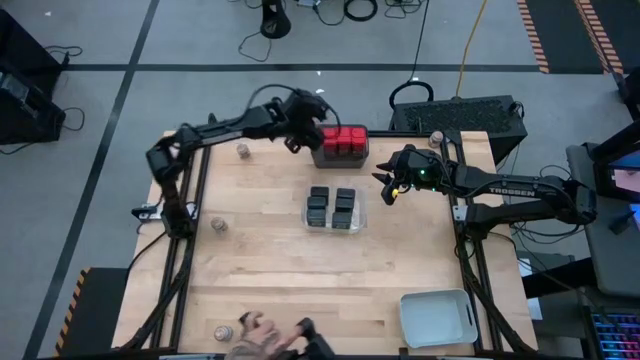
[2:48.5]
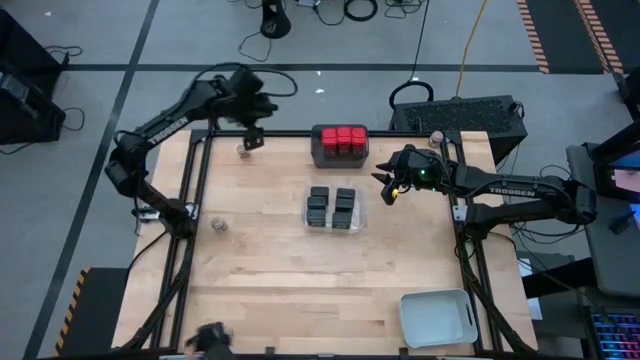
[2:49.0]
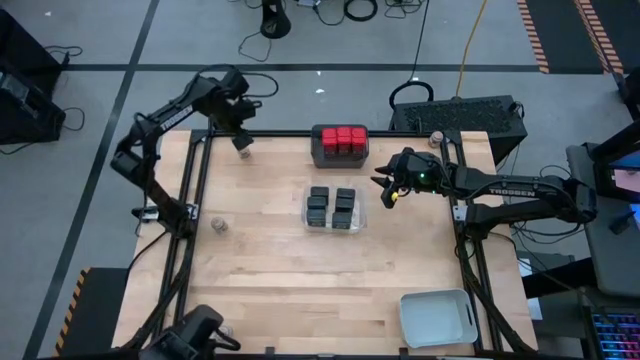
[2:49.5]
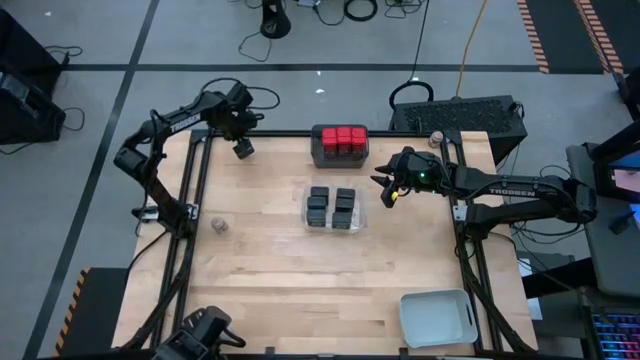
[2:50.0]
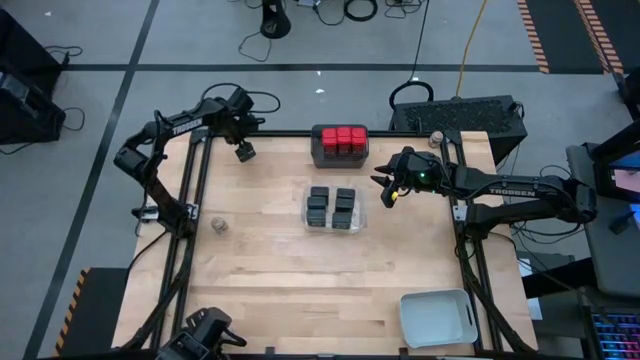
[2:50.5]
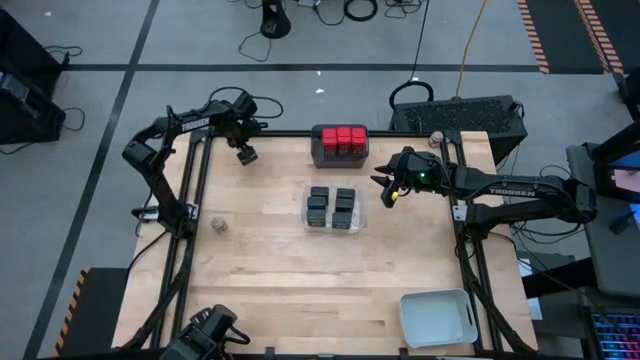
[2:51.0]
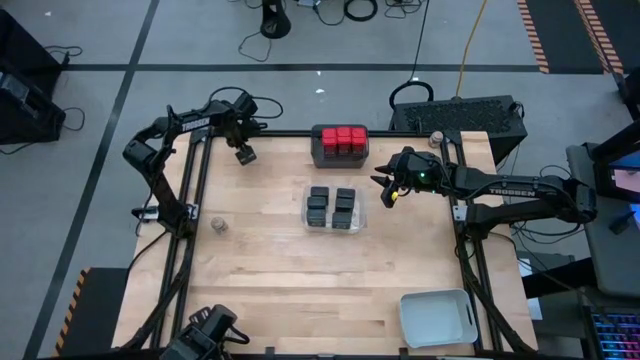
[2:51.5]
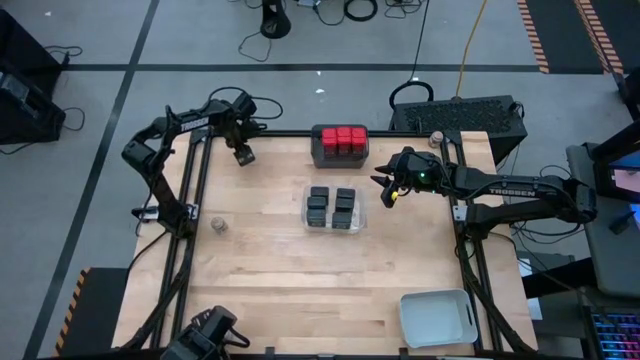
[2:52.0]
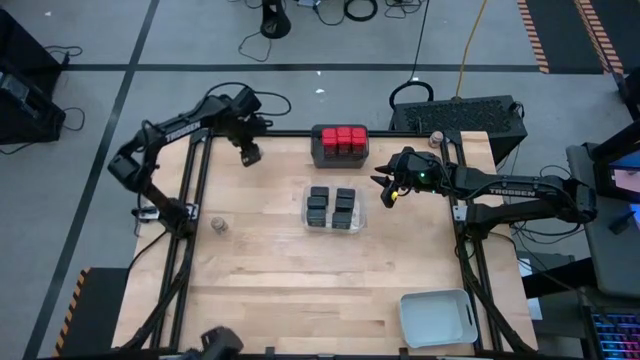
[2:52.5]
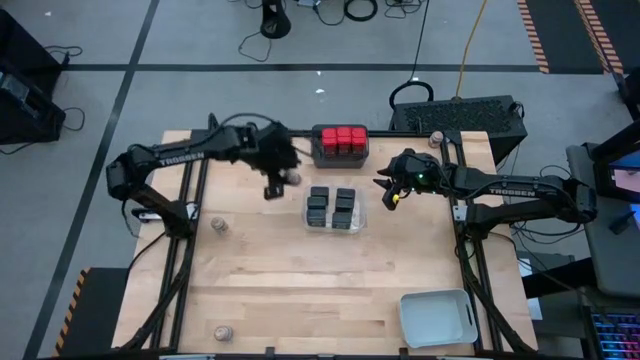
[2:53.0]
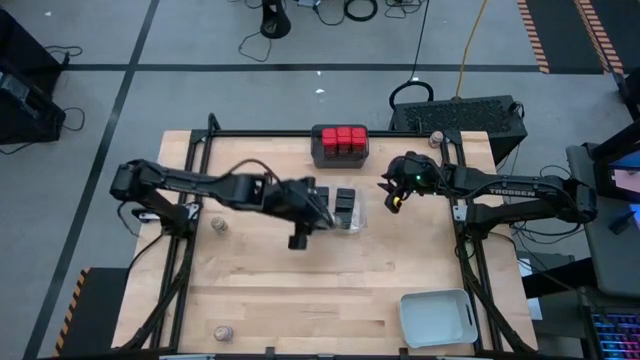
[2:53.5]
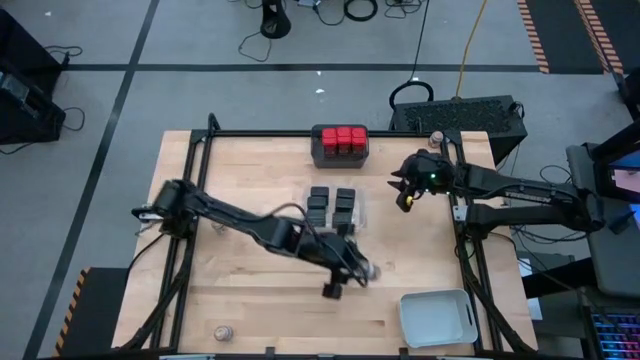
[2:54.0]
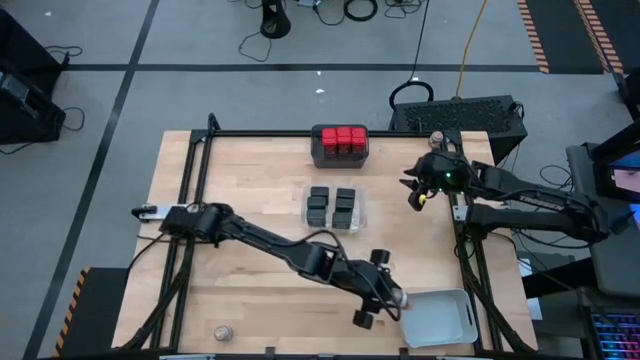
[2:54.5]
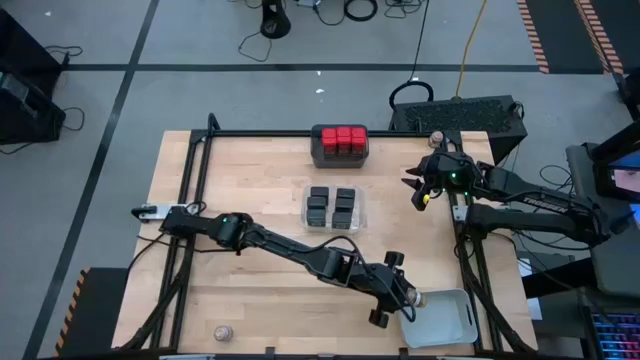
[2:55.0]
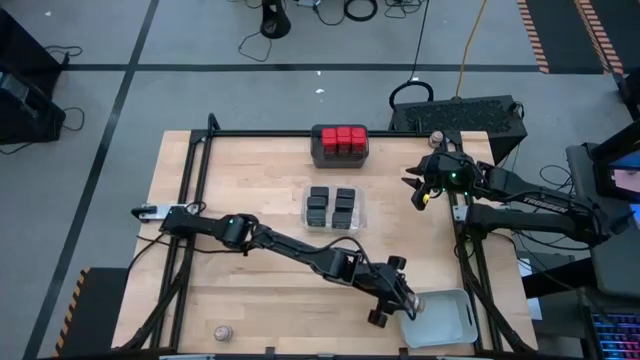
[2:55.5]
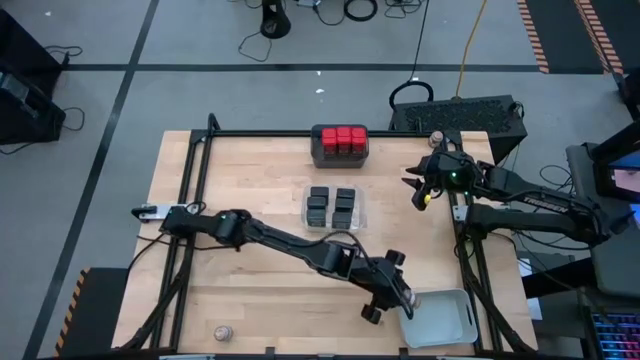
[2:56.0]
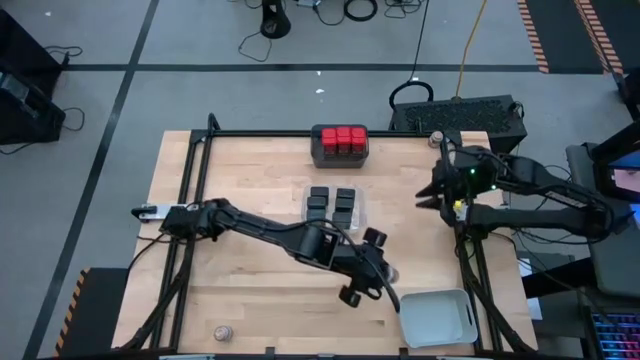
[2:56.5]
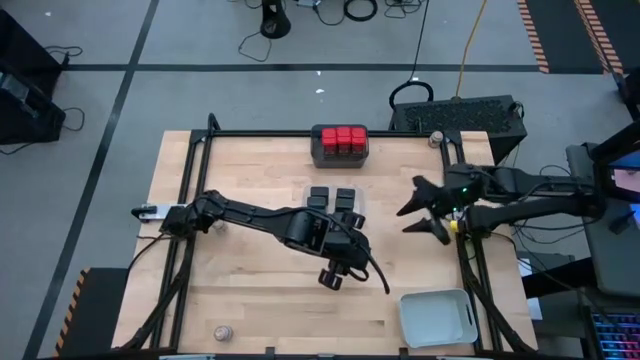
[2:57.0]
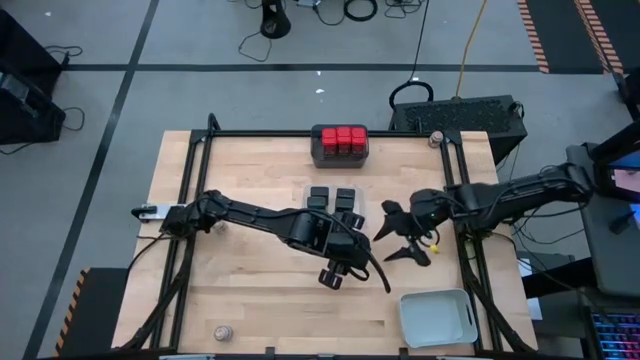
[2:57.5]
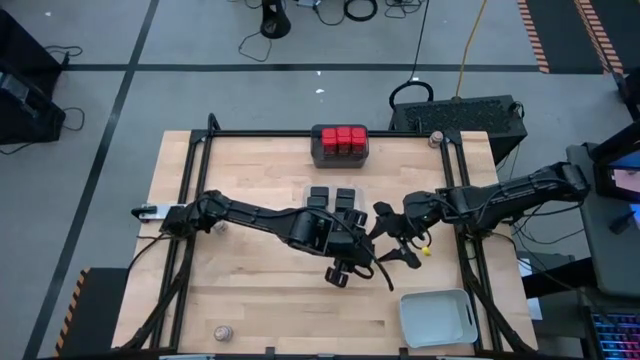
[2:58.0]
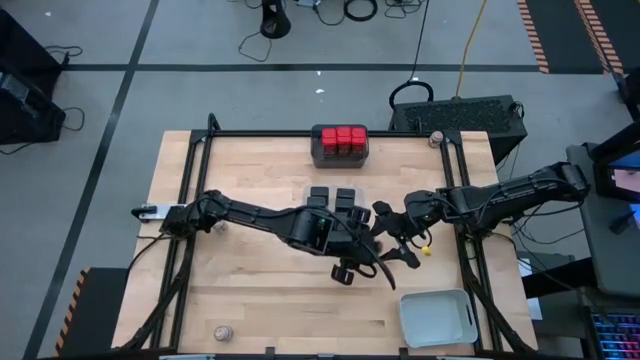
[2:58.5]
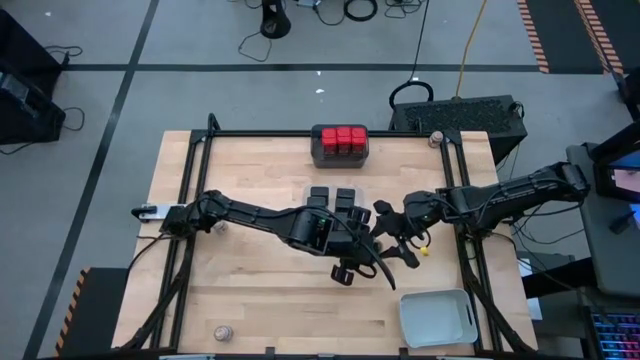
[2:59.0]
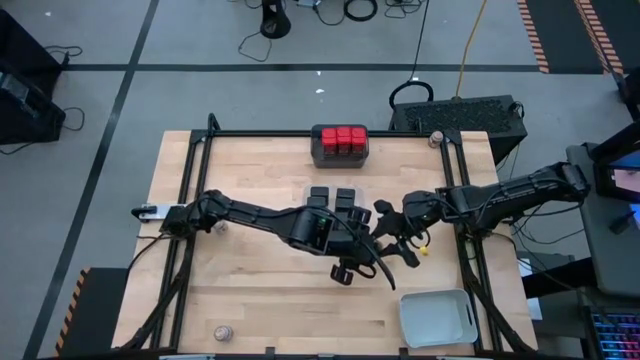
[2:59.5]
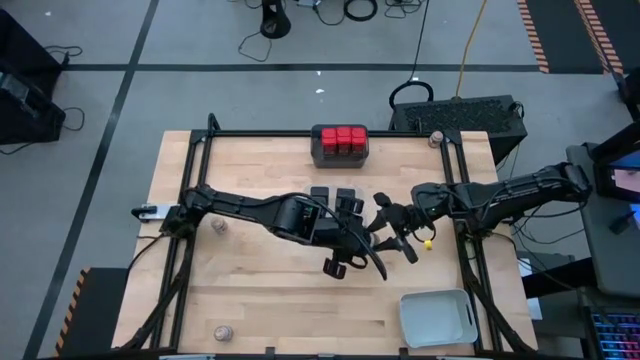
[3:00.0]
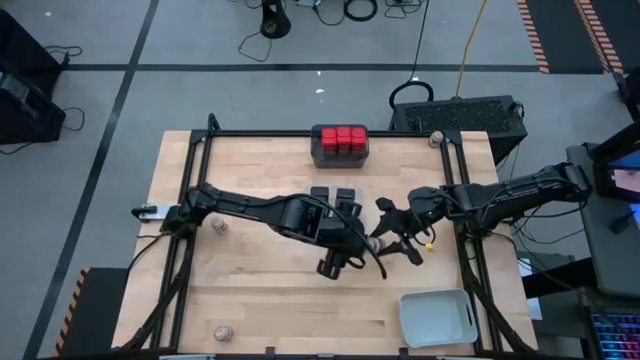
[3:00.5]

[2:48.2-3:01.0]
Task: Sort spices by type
Put the brown seasoning into the white bin

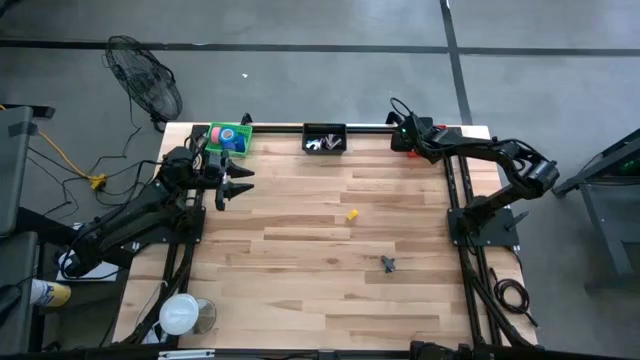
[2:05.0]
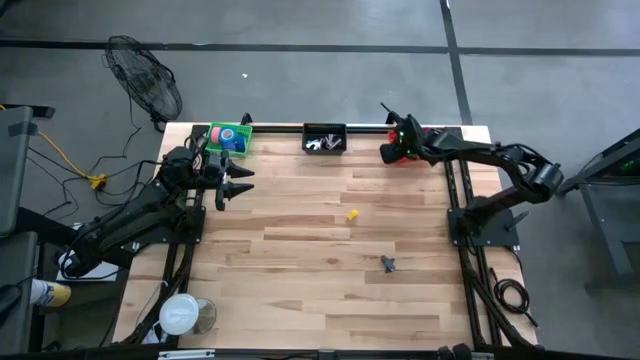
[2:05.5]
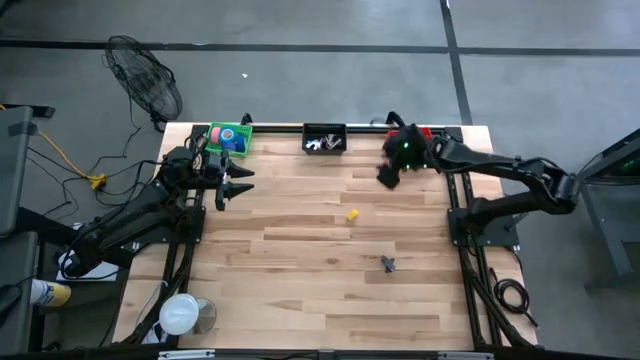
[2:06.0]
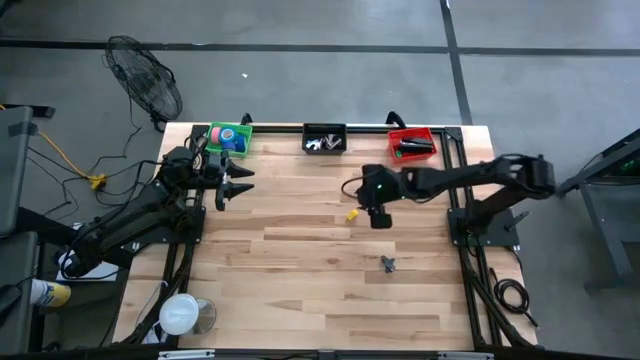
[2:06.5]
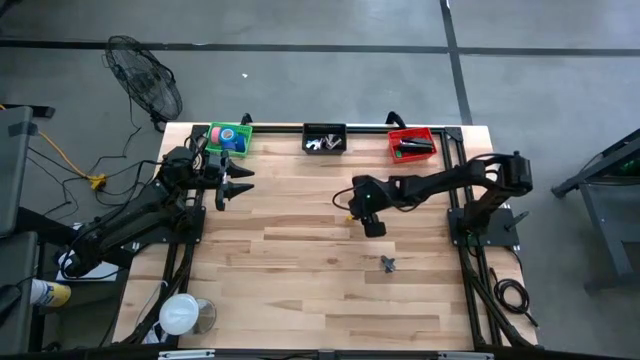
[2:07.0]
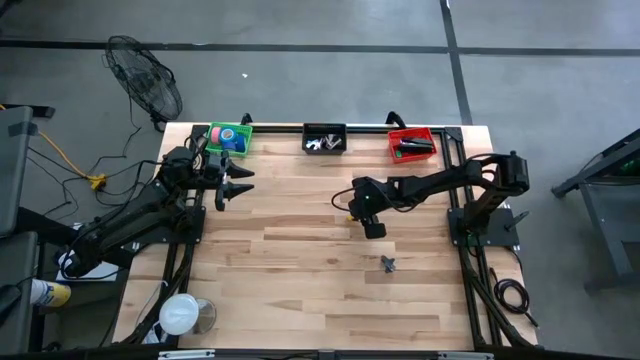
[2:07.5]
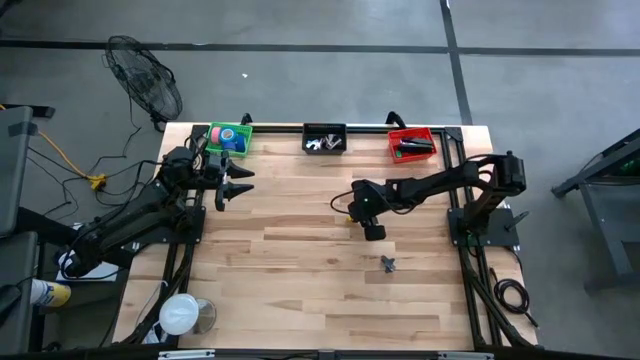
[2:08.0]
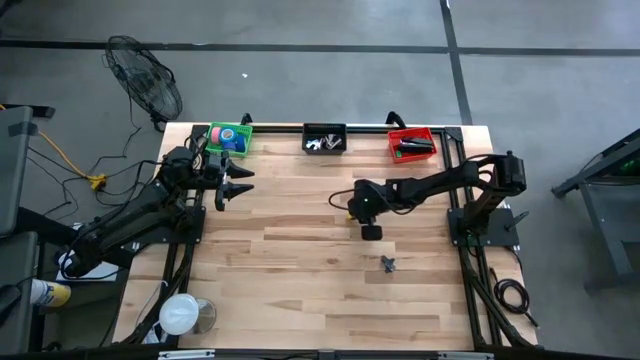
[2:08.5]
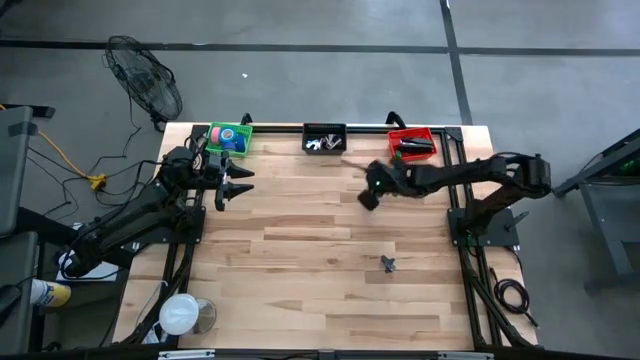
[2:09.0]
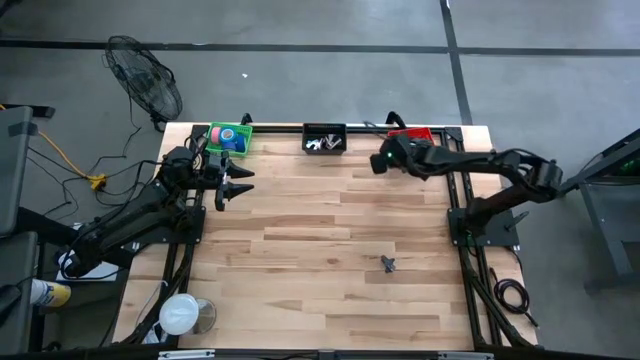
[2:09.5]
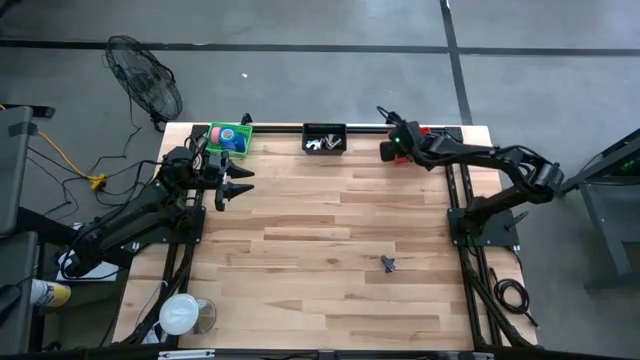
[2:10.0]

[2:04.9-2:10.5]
Task: Pick and place Stapler, Stapler remover, tape
Put the yellow stapler in the red bin

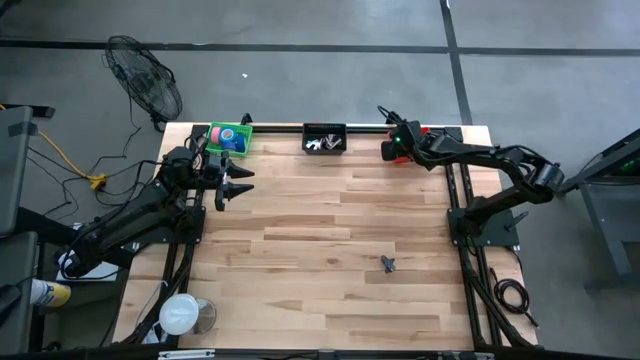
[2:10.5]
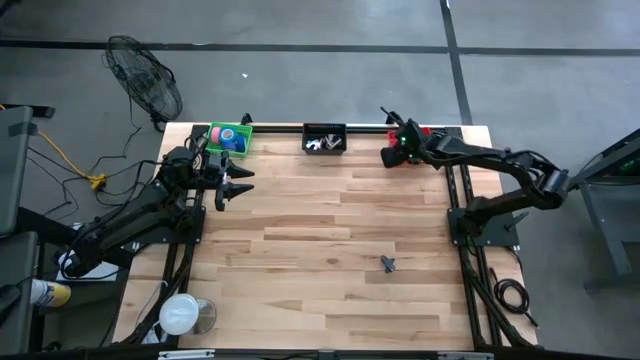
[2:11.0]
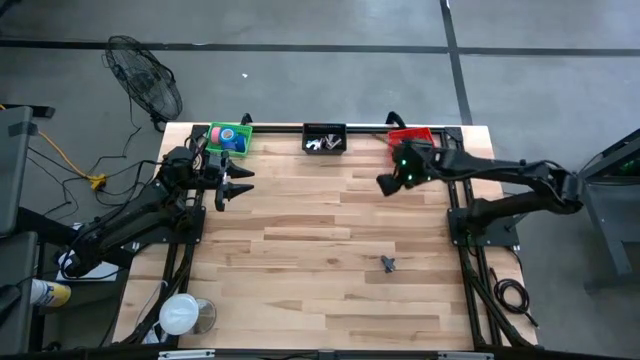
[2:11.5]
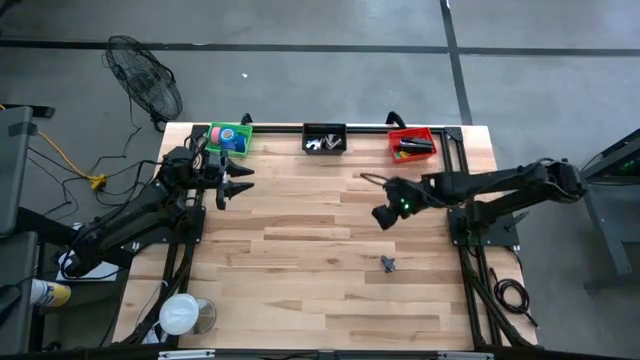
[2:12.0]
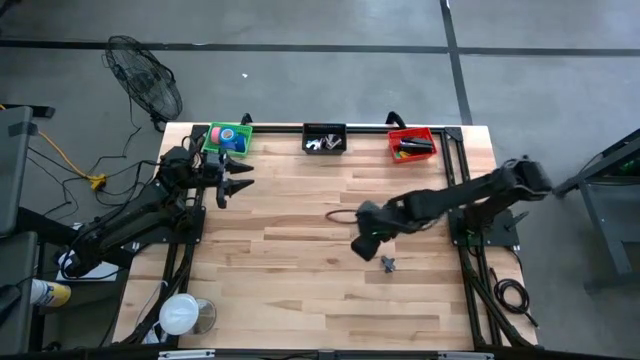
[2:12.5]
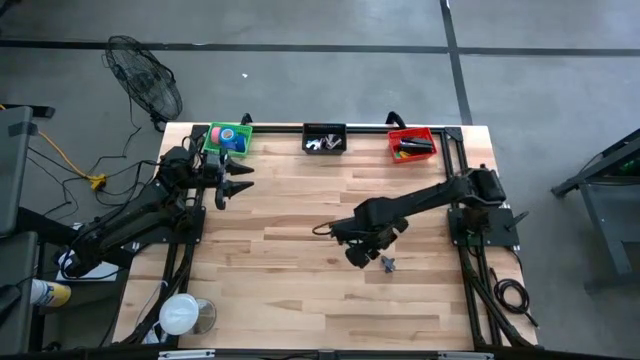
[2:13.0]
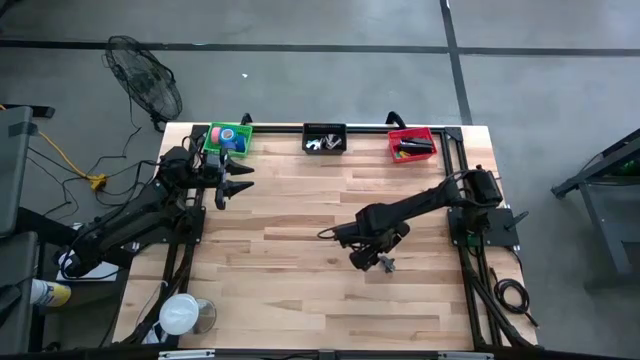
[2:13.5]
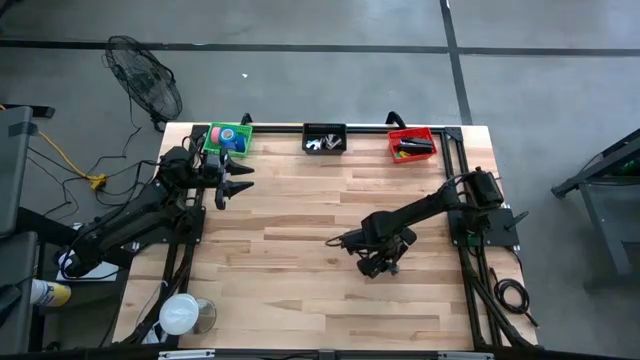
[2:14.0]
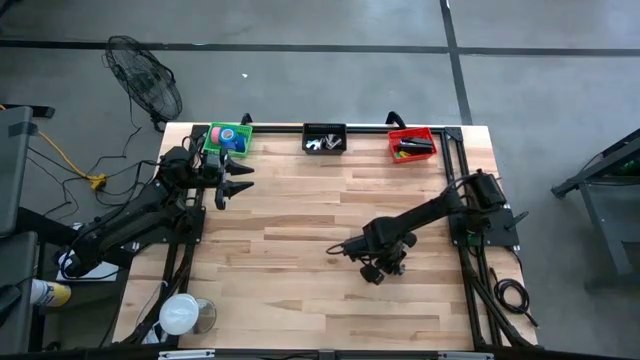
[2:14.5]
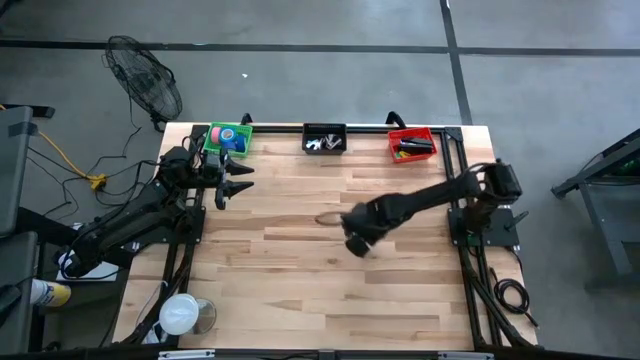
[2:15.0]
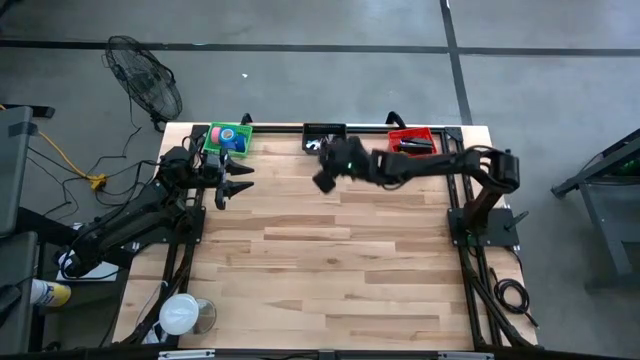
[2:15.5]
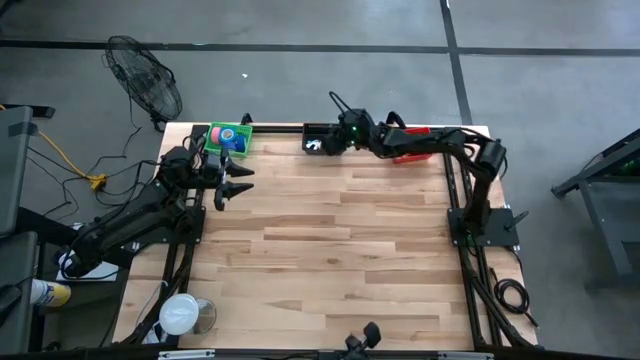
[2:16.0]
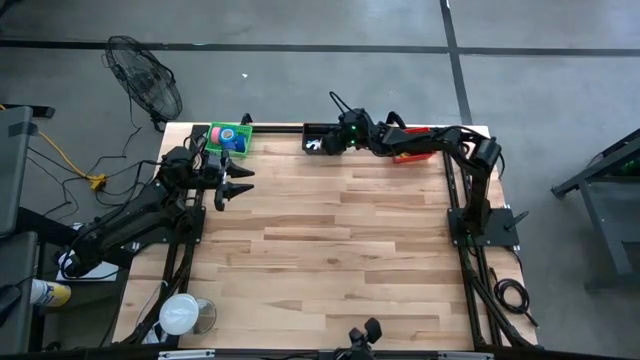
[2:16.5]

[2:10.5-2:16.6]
Put the black staple remover in the black bin
